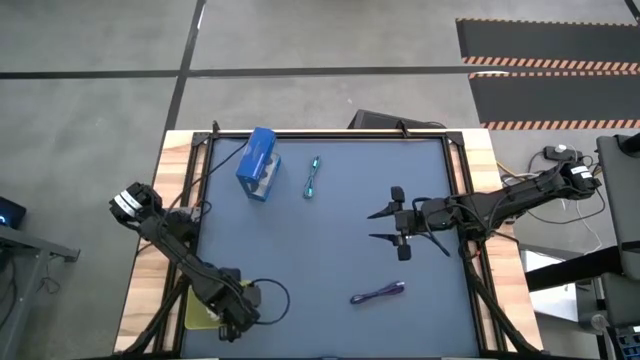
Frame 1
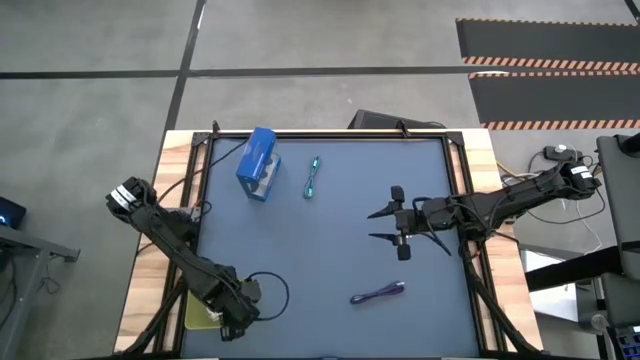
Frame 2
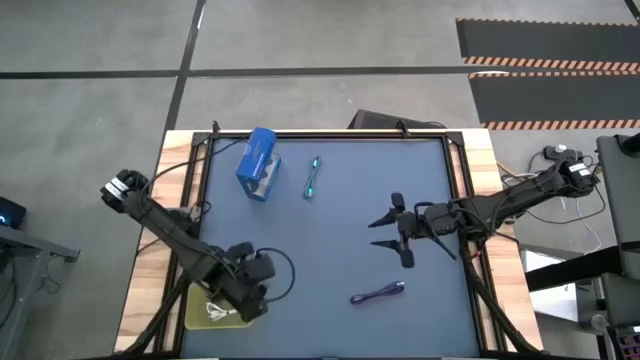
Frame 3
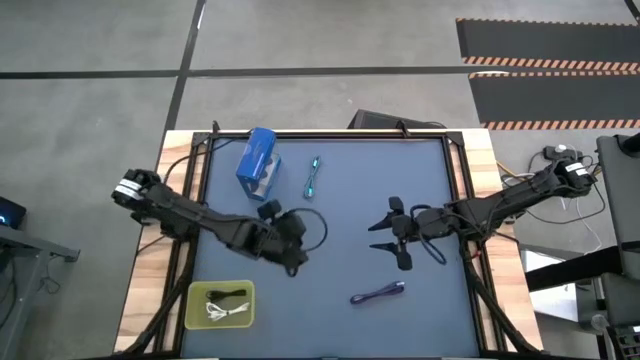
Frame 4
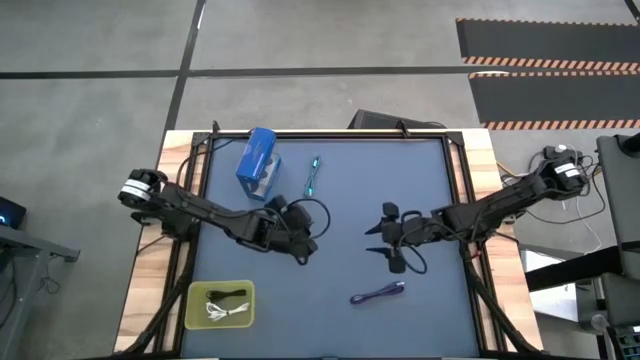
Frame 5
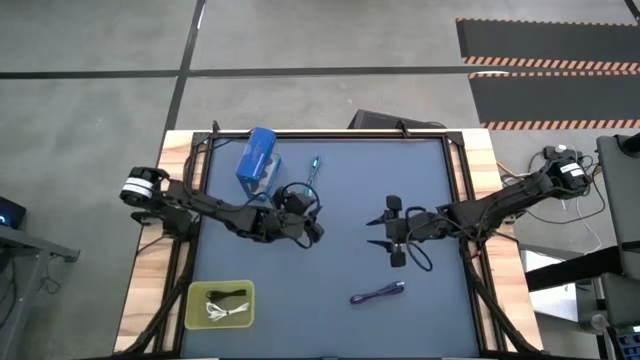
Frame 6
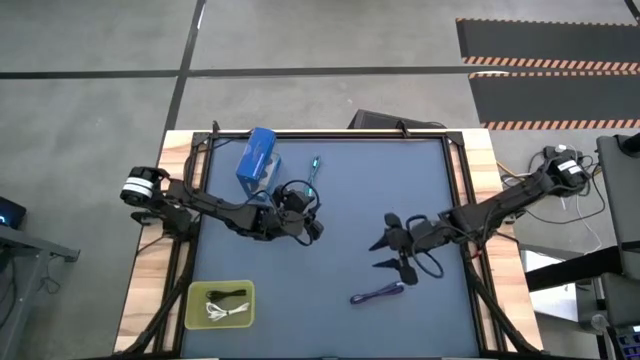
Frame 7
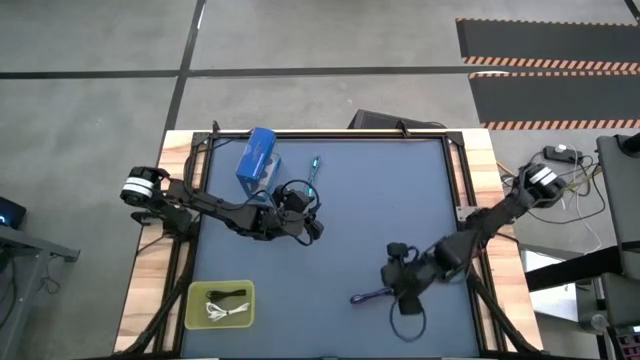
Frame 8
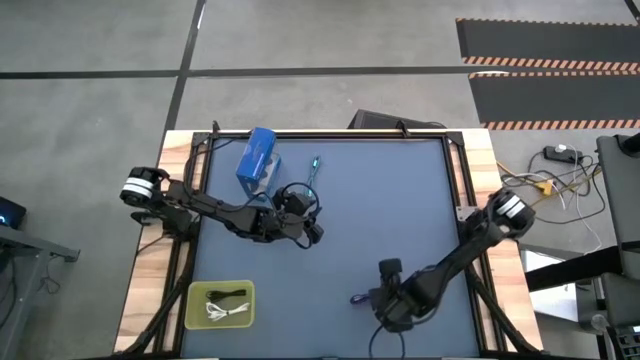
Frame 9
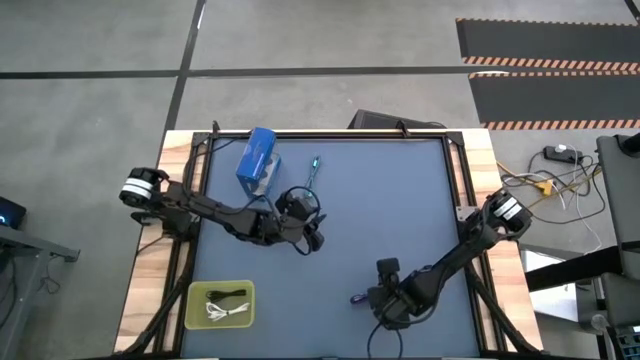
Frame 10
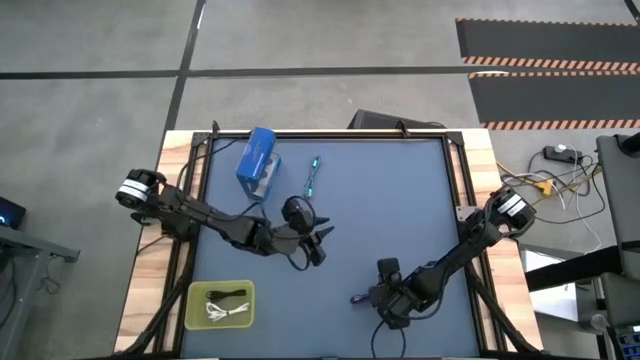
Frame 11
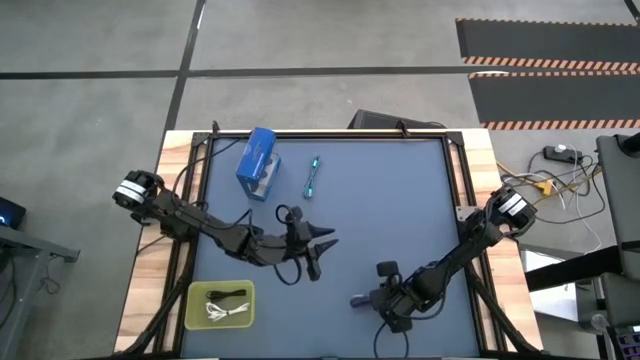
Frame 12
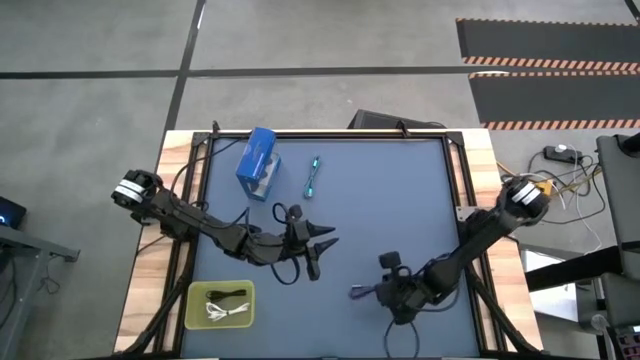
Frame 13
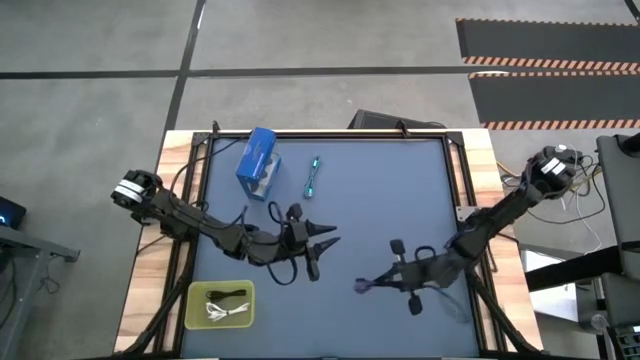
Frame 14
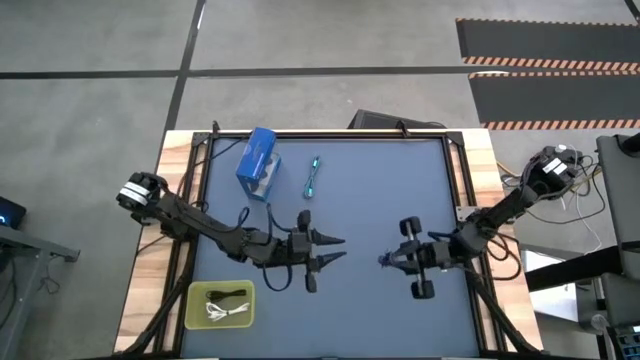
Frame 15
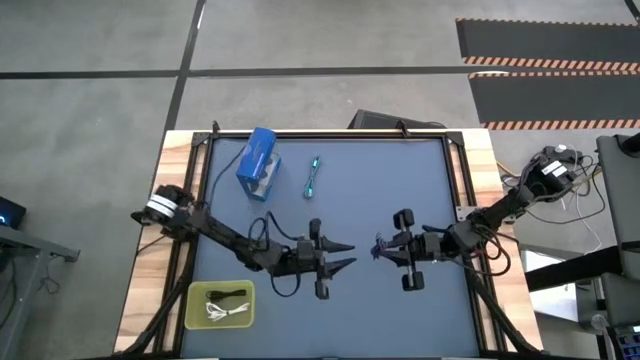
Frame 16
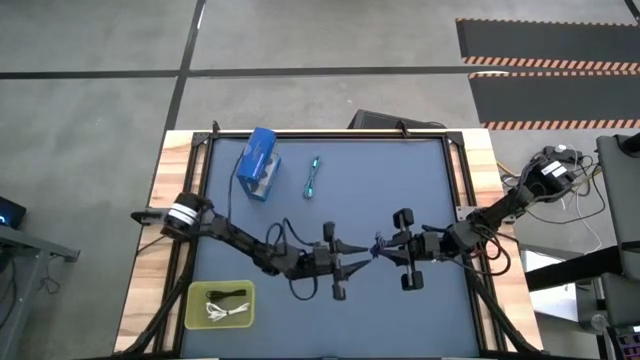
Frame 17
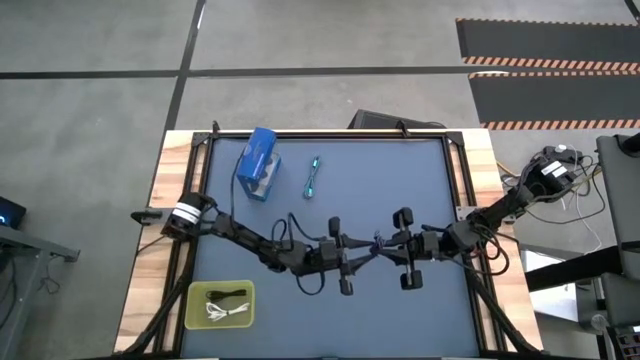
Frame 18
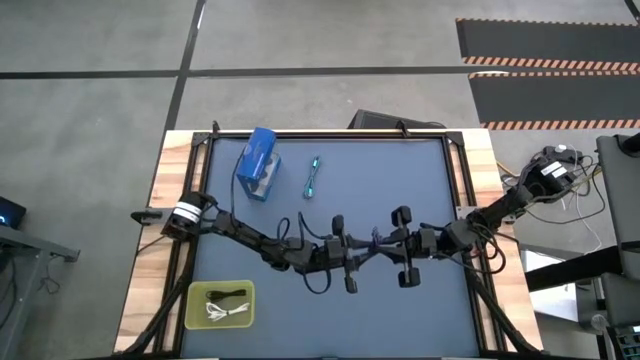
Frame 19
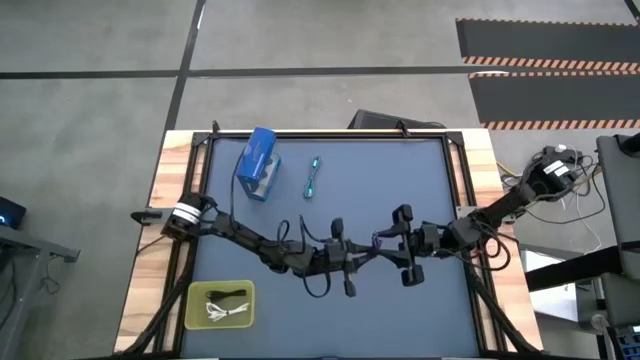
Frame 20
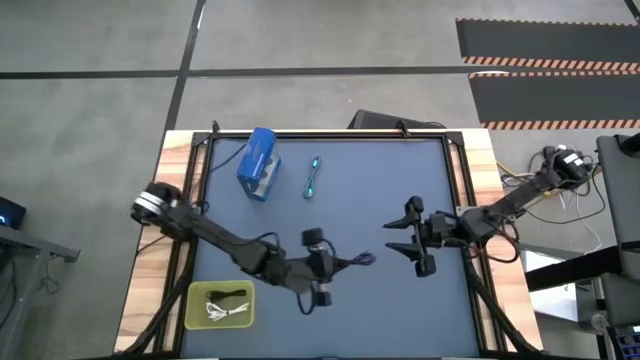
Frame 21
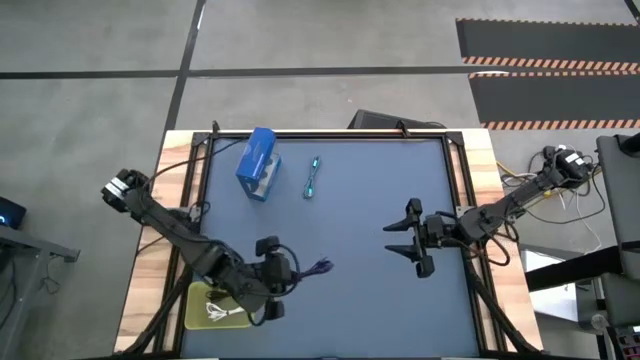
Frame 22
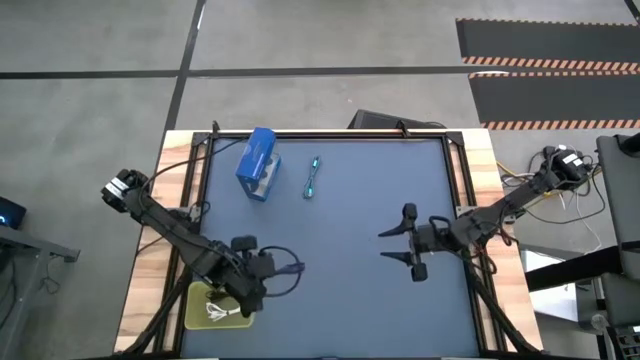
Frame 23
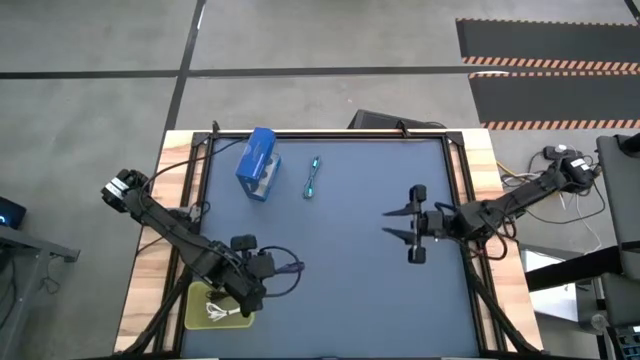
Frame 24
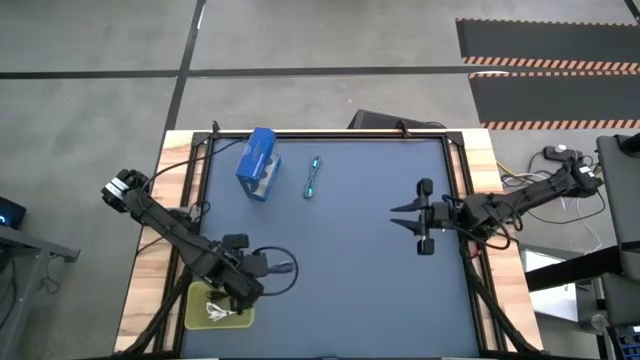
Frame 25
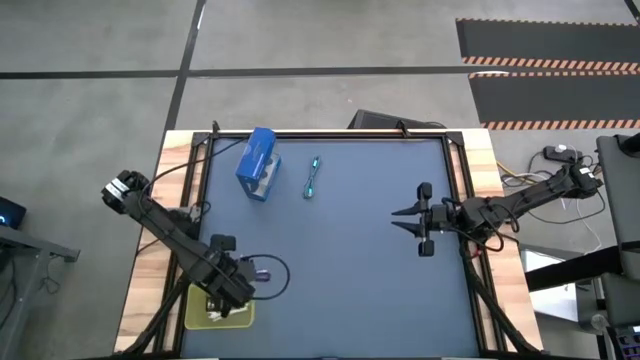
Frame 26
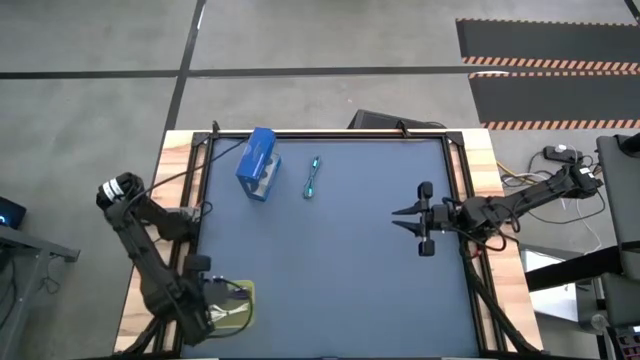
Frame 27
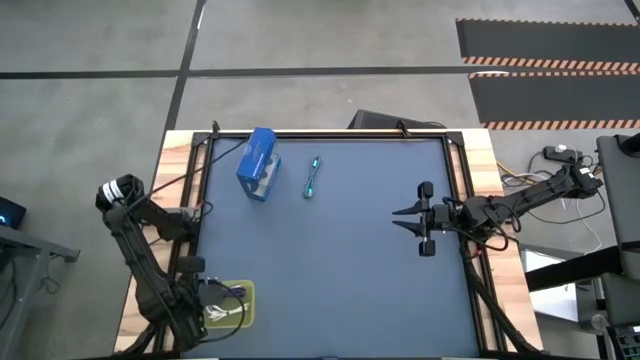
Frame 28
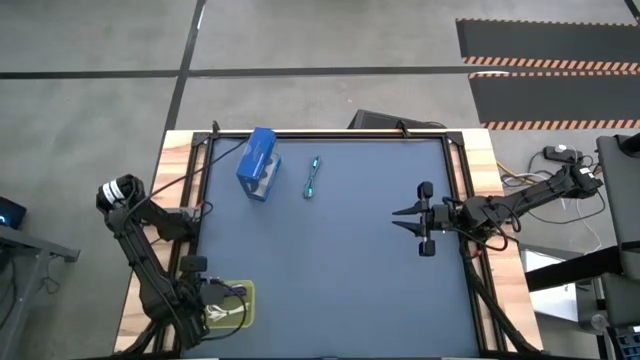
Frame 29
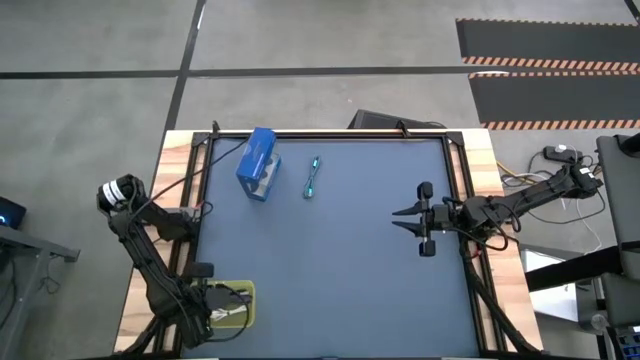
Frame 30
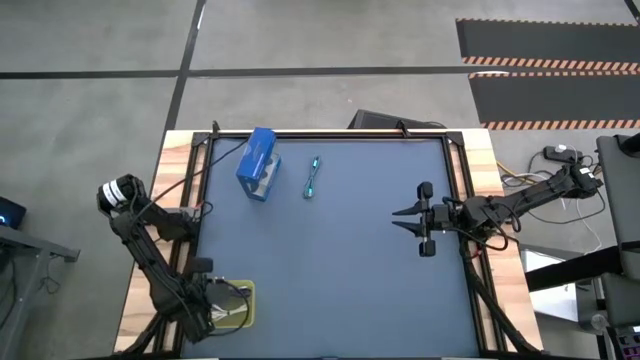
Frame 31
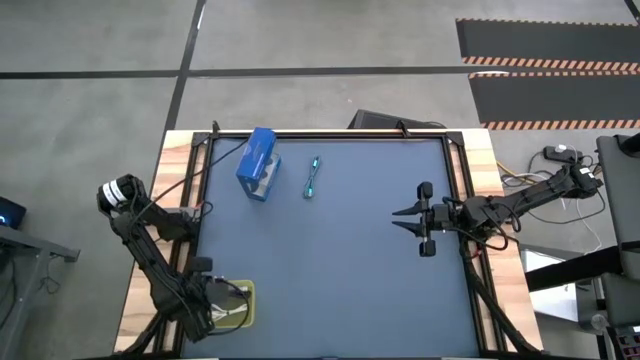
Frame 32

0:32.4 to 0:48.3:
Task: Pick and place USB-C Cables
Put the violet white charger cable into the yellow bin

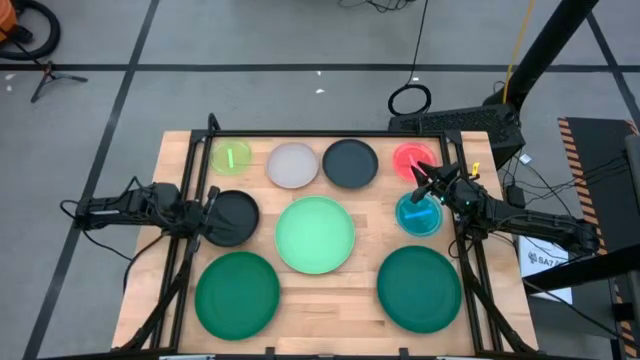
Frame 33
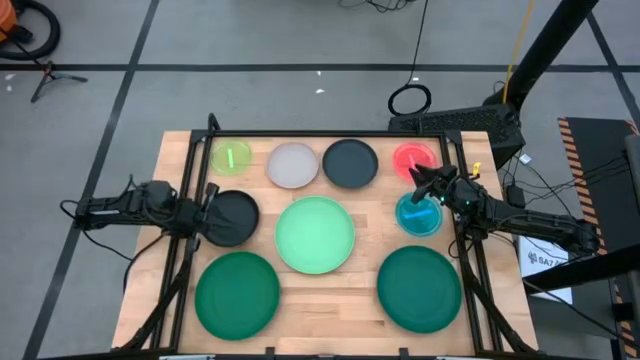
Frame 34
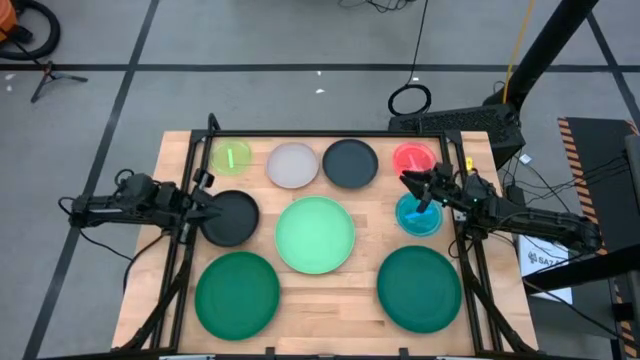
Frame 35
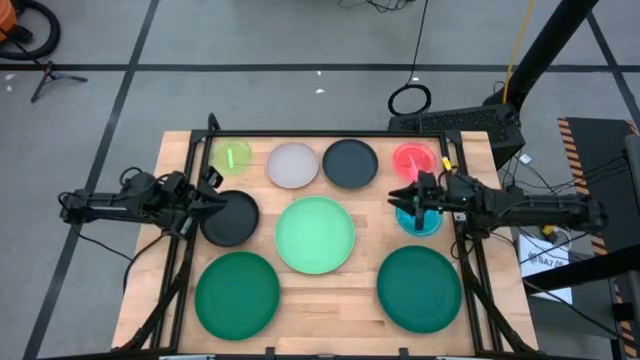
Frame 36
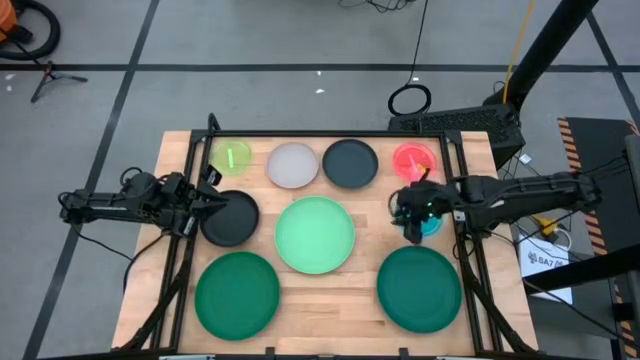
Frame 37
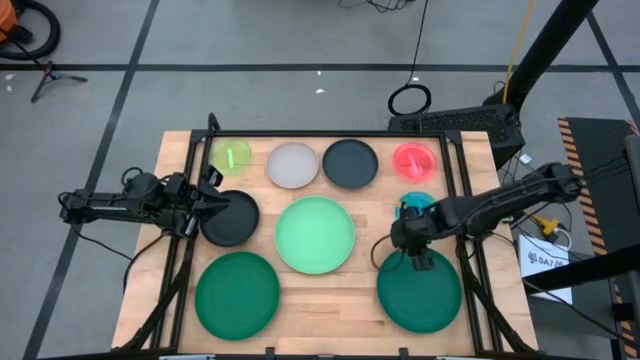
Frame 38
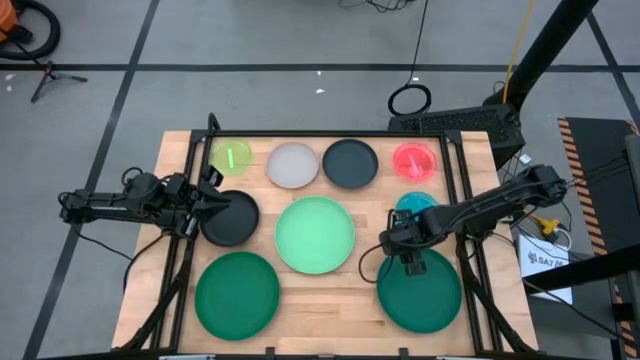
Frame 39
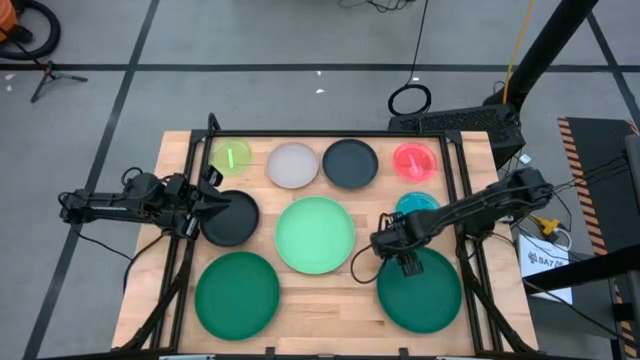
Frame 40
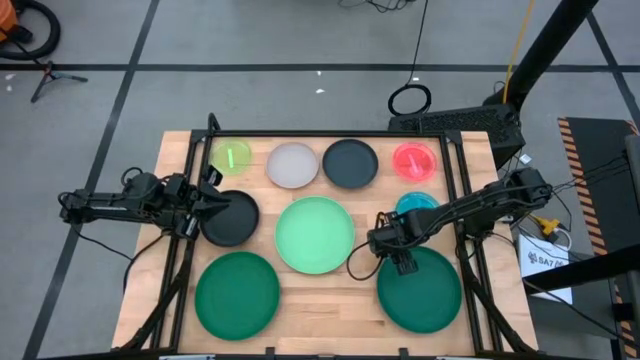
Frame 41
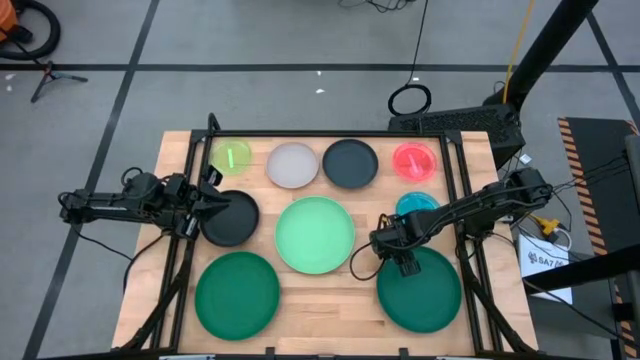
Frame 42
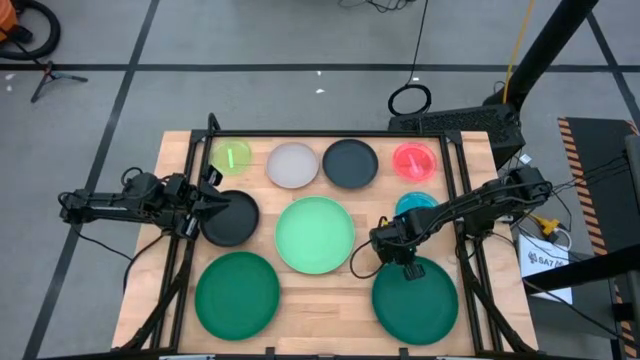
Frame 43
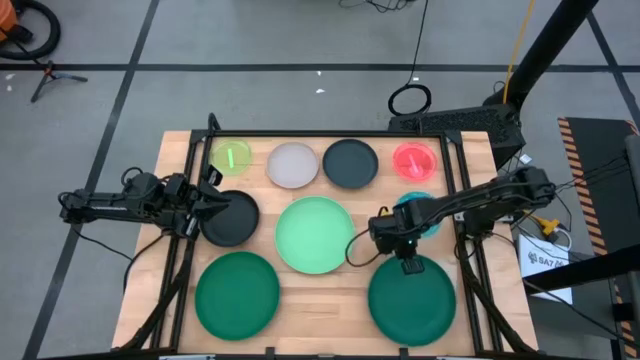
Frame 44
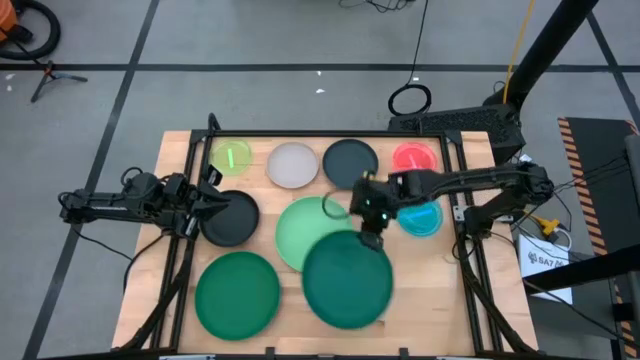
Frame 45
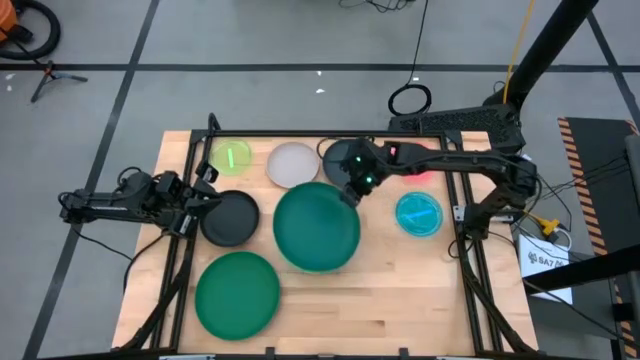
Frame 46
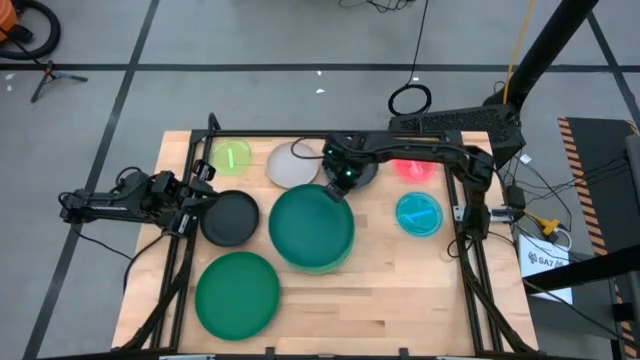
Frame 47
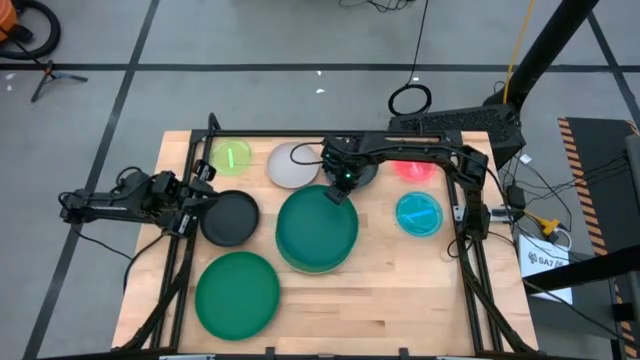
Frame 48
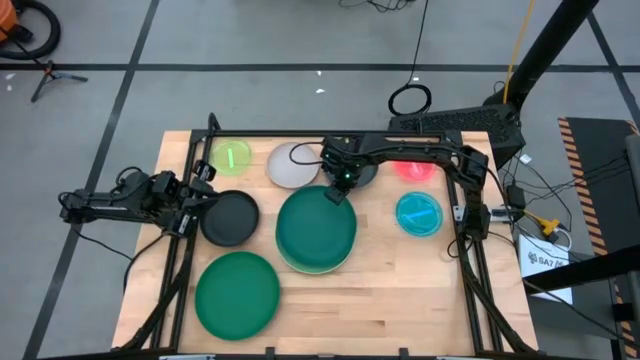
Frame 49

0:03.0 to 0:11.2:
Task: Stack plastic plates
Stack the right dark green plate on top of the green plate
